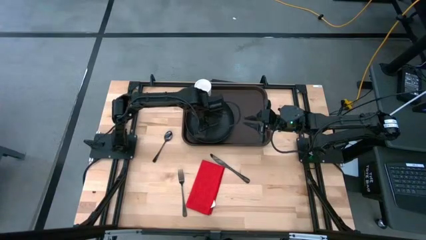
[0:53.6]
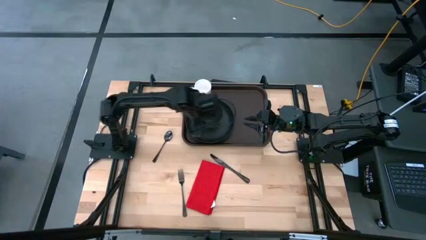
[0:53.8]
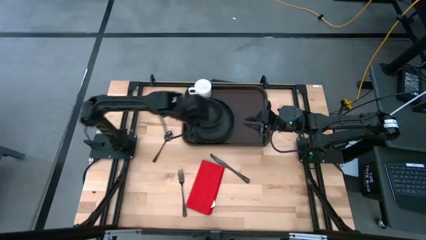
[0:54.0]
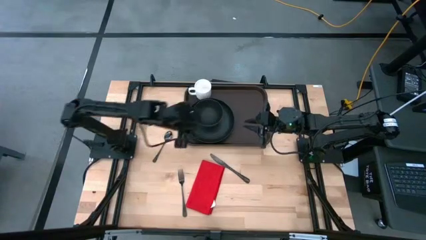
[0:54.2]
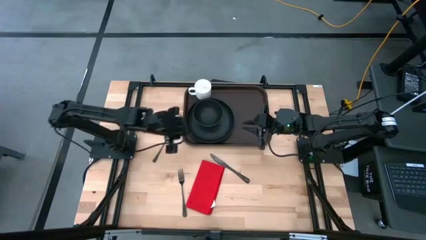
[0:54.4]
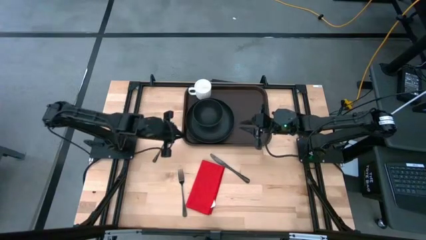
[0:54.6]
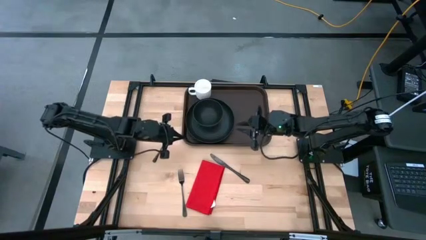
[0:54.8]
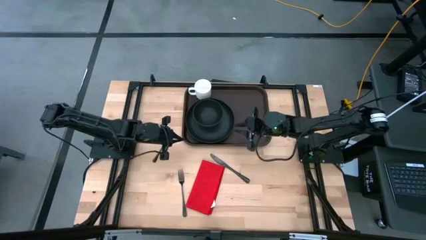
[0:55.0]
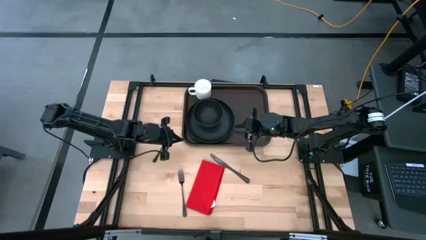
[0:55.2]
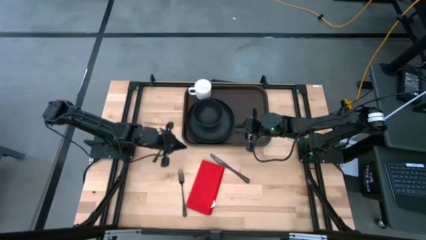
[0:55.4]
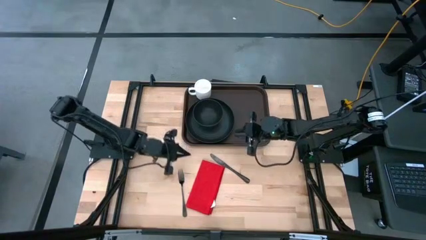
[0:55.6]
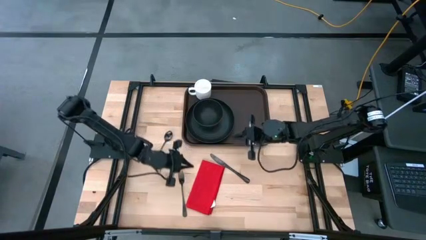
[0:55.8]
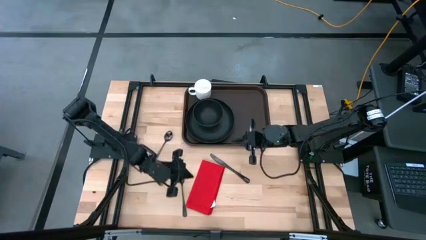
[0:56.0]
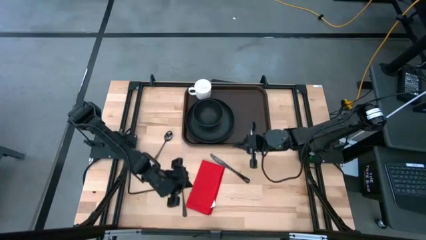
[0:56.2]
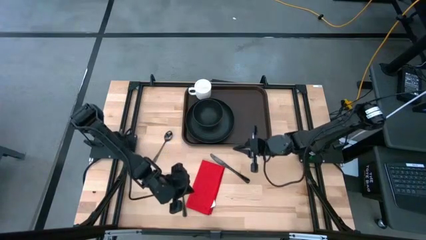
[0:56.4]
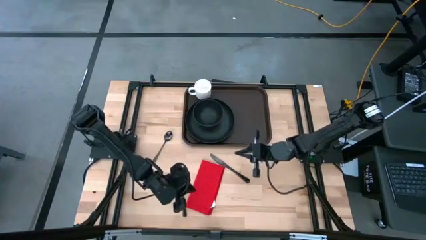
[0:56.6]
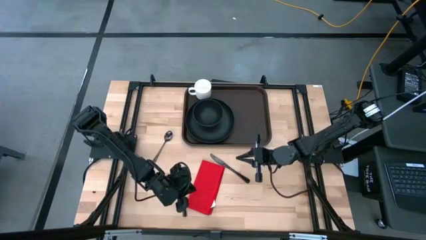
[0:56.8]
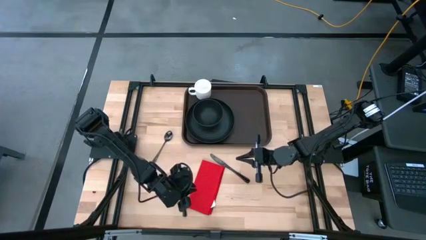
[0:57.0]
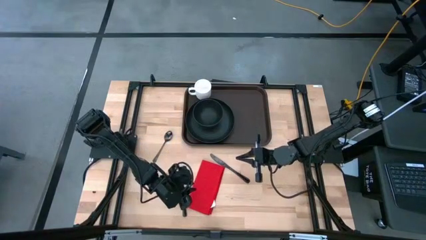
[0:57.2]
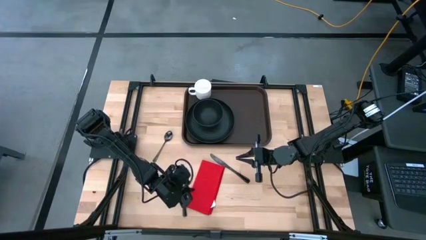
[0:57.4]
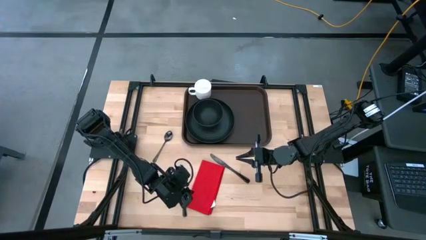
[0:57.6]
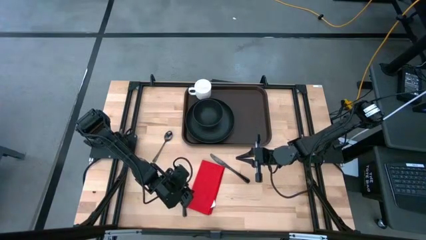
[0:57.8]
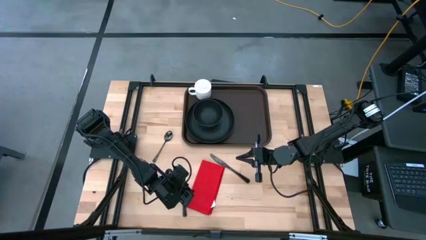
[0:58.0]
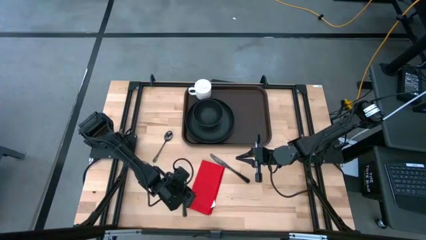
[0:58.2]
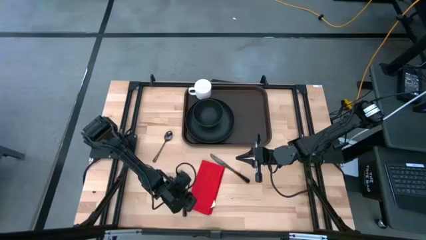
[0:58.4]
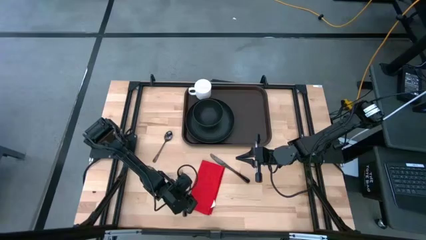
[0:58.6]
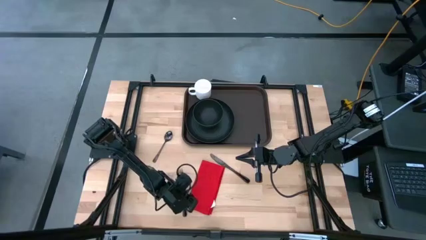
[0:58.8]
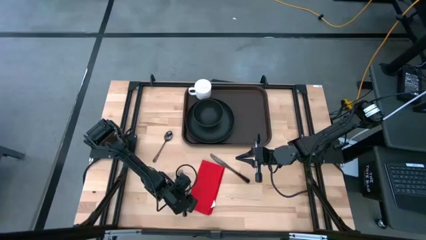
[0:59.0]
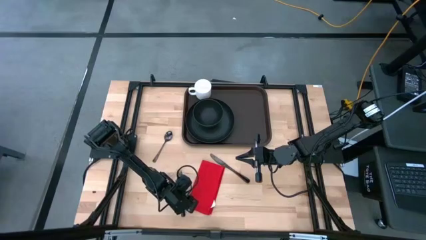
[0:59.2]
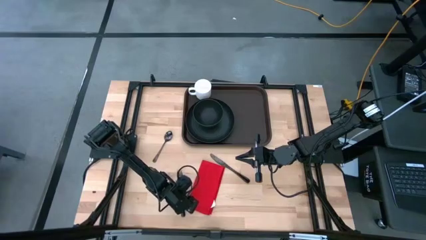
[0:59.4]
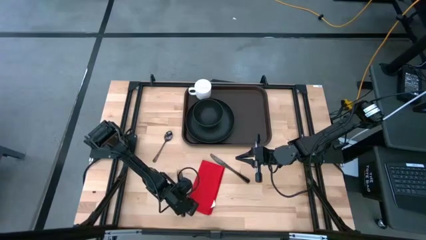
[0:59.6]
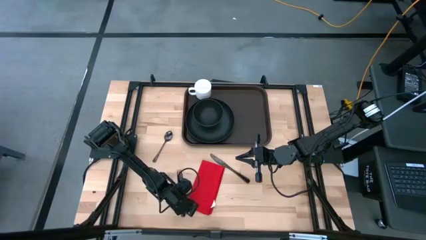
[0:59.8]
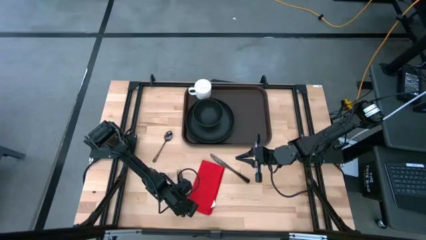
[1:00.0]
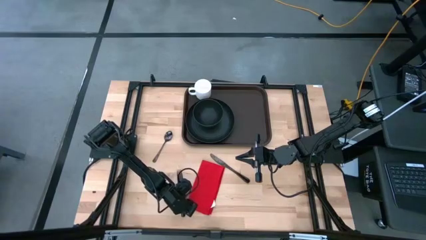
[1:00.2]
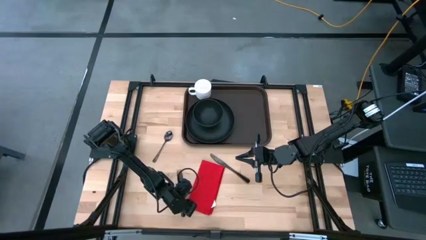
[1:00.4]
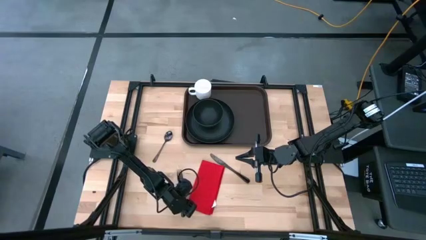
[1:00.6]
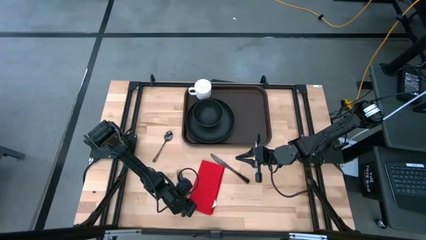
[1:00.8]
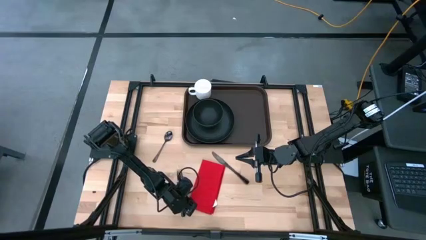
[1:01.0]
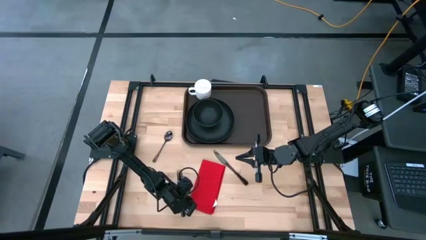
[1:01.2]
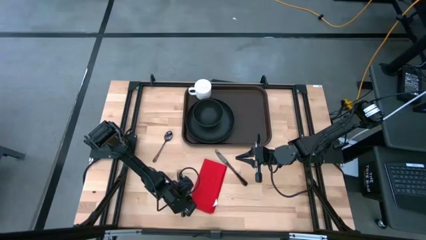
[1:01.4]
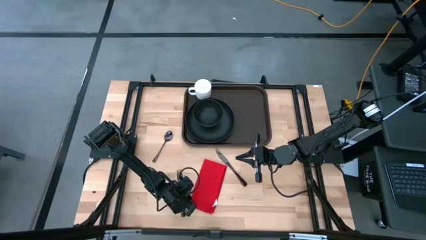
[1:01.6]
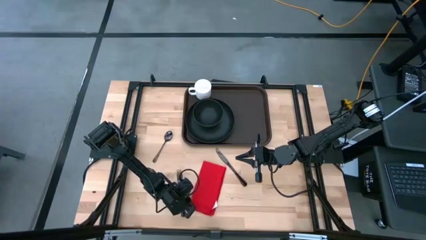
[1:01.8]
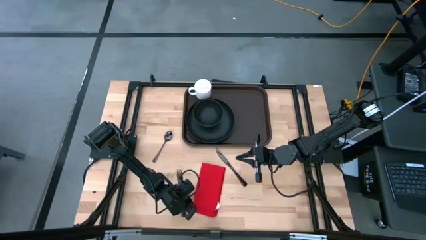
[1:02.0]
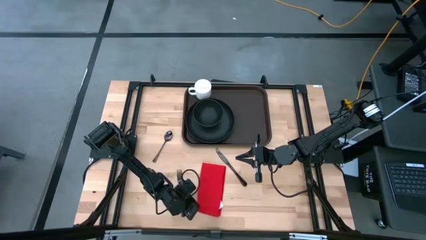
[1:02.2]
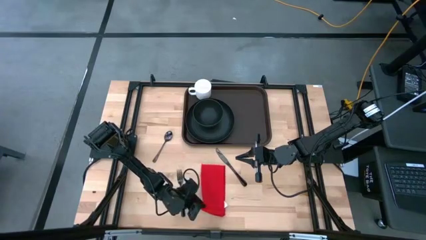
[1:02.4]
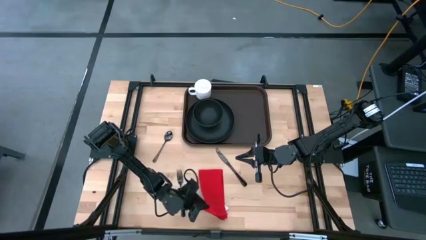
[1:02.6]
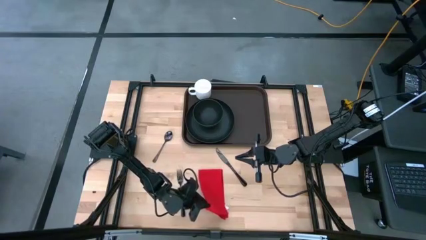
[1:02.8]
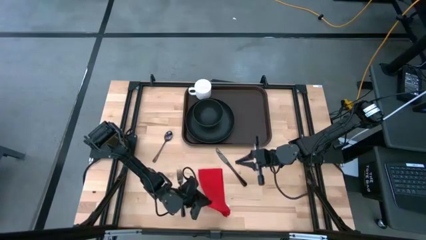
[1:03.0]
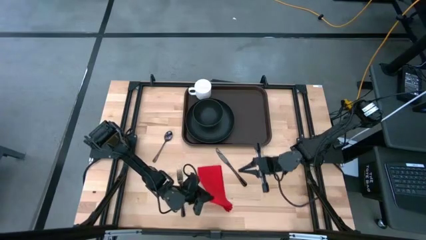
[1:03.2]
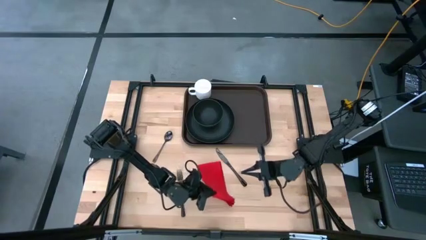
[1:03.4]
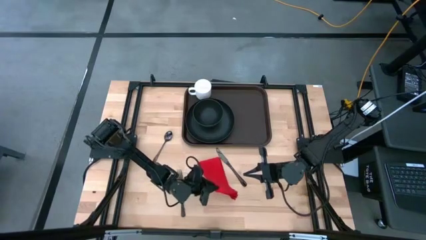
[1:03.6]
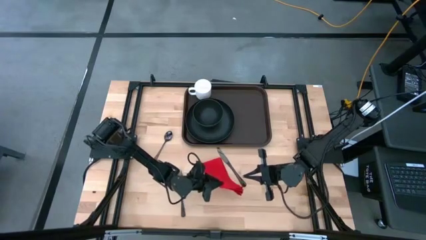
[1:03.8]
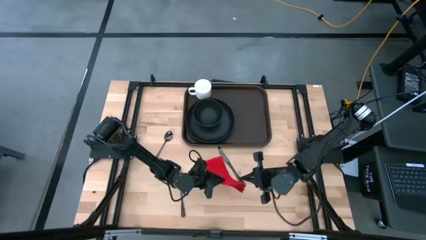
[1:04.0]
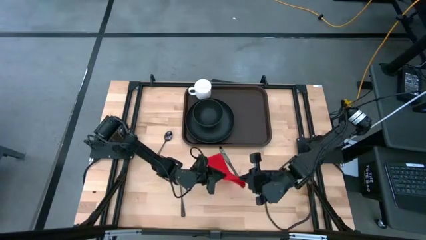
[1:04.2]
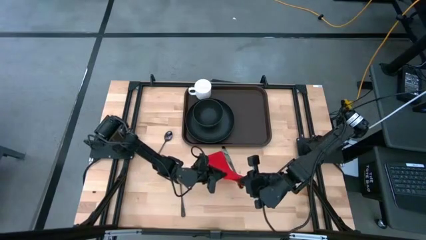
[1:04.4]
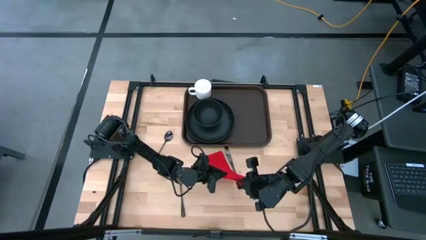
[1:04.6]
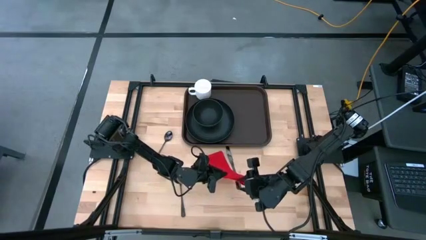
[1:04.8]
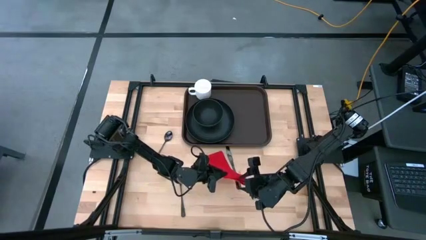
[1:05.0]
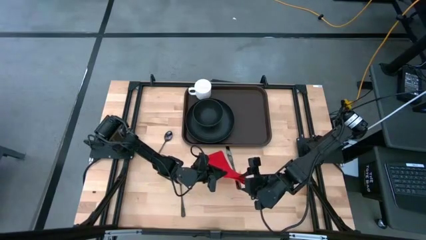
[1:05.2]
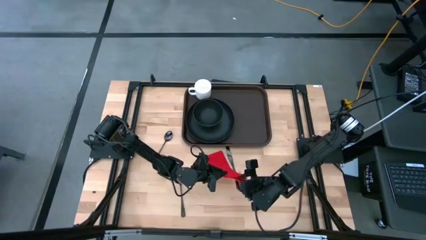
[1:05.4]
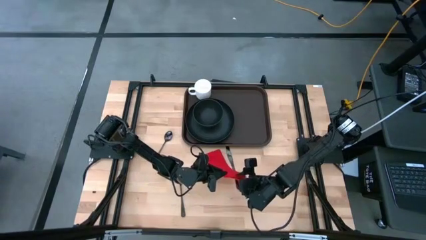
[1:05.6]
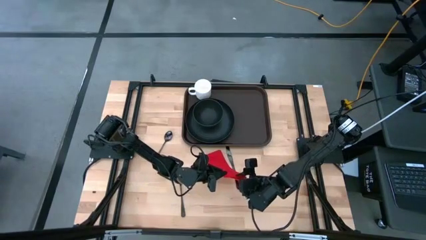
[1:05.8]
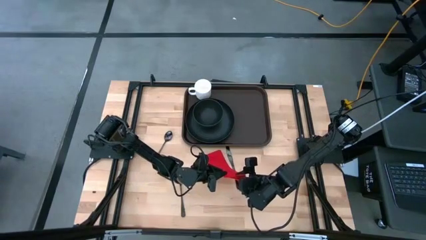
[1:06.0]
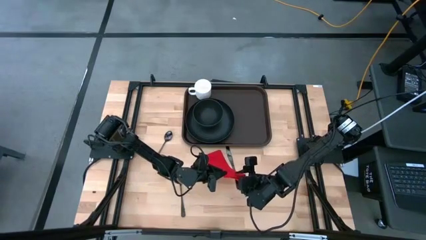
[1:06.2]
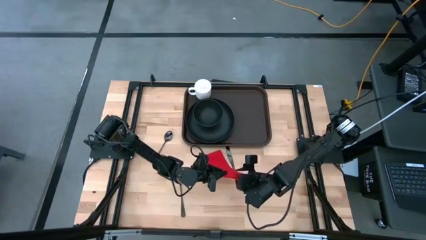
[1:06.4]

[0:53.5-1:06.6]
Task: Set up tray
Put the red table napkin on the brown serving tray to the top right of the black plate
